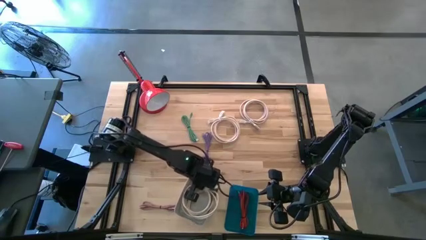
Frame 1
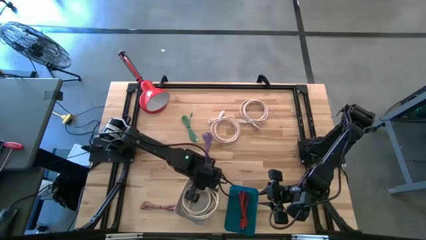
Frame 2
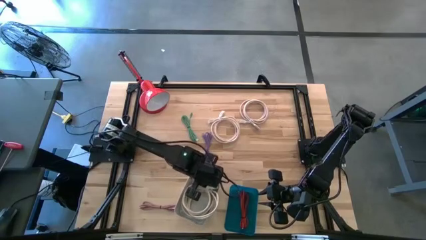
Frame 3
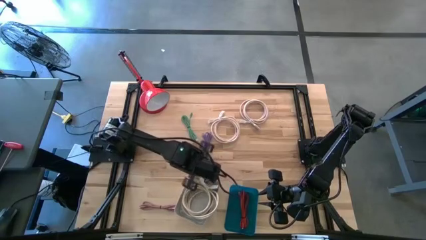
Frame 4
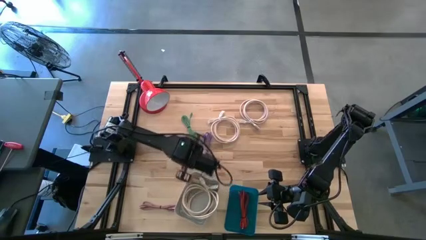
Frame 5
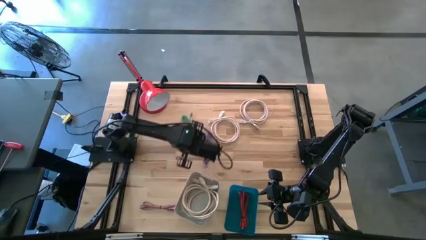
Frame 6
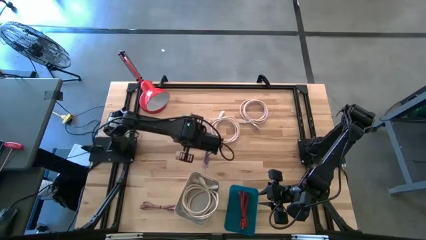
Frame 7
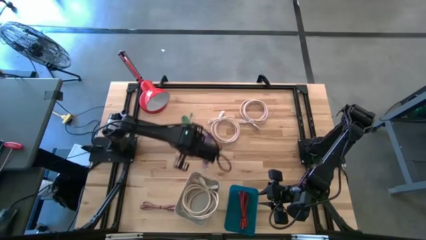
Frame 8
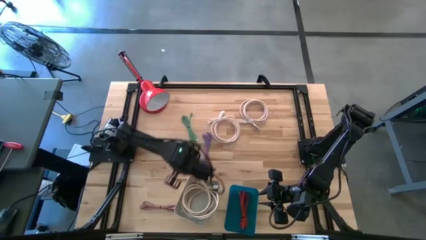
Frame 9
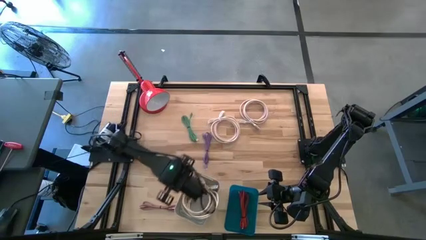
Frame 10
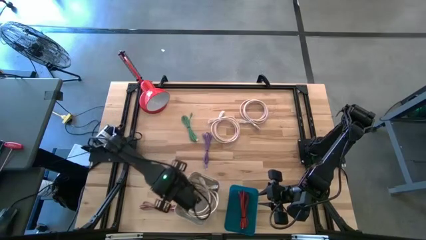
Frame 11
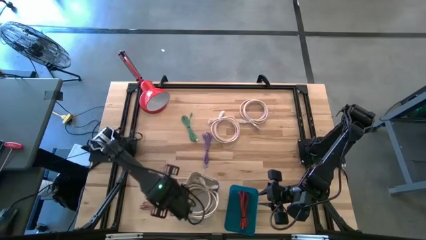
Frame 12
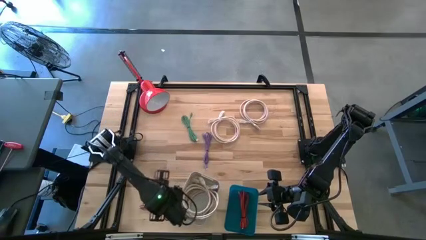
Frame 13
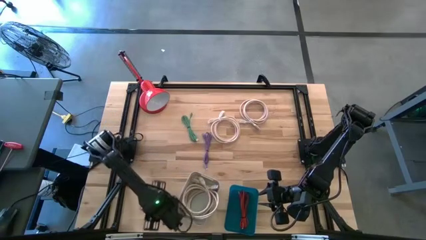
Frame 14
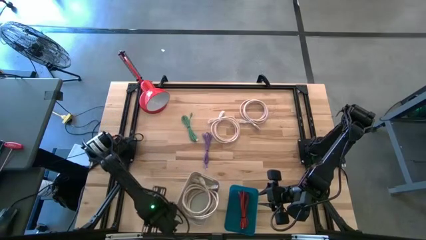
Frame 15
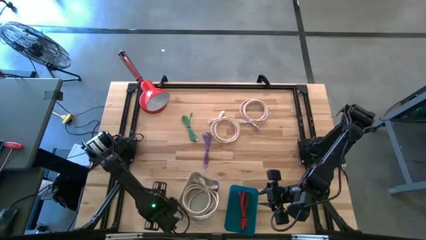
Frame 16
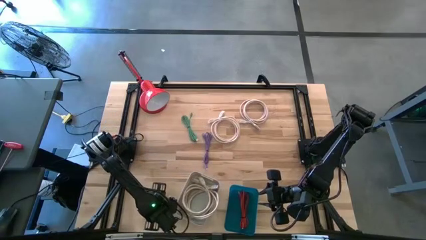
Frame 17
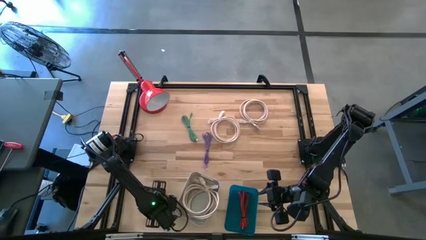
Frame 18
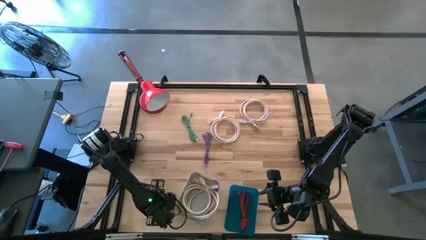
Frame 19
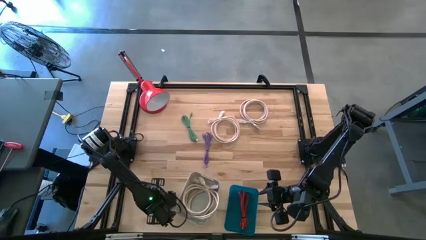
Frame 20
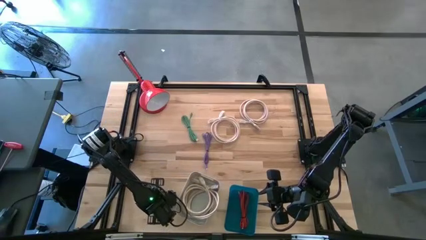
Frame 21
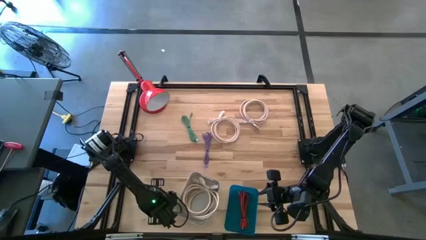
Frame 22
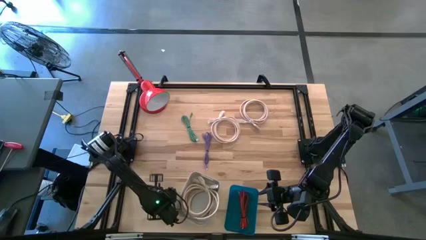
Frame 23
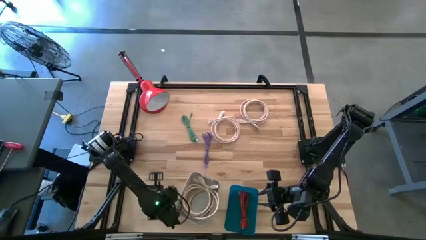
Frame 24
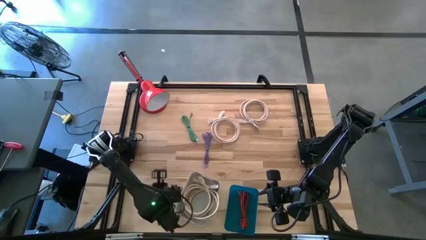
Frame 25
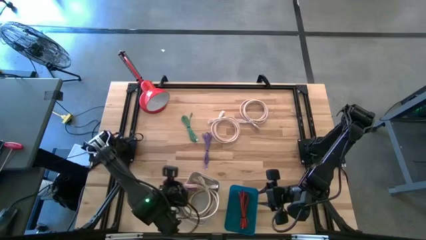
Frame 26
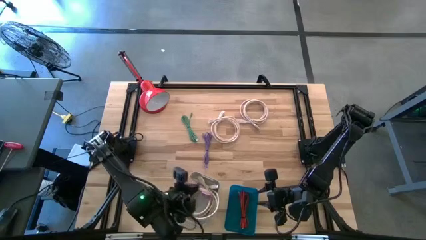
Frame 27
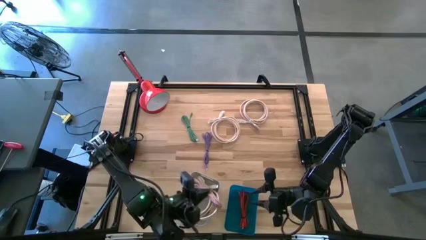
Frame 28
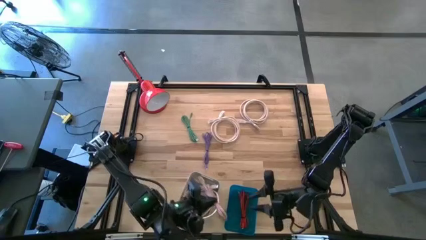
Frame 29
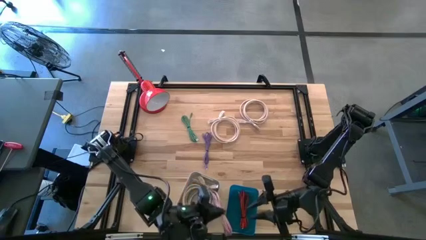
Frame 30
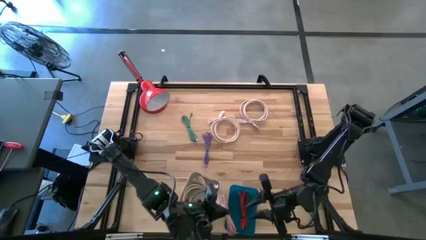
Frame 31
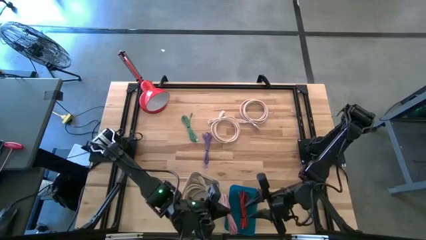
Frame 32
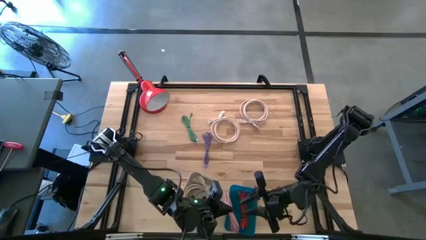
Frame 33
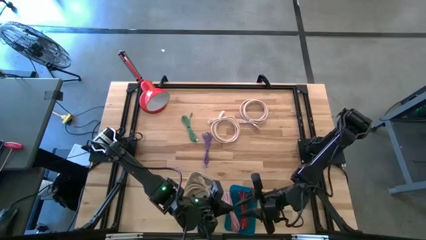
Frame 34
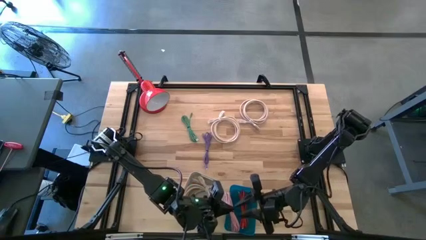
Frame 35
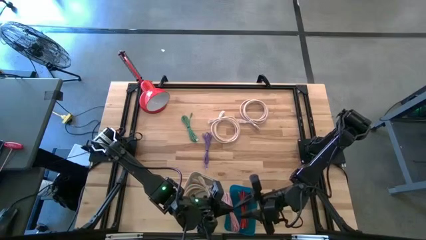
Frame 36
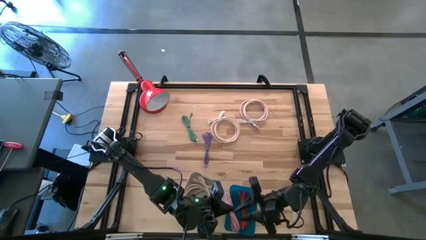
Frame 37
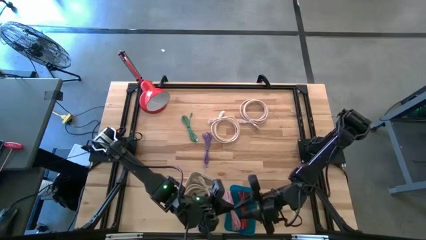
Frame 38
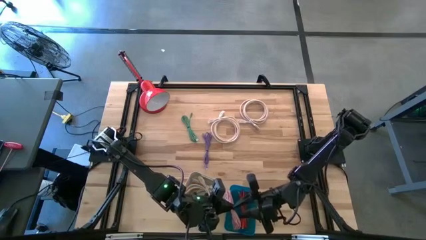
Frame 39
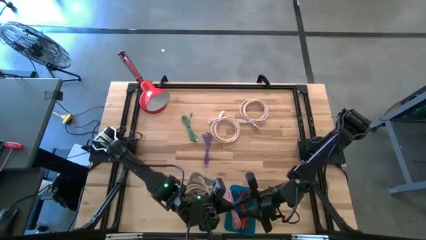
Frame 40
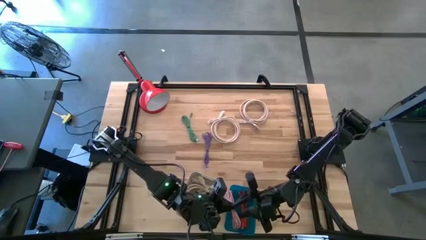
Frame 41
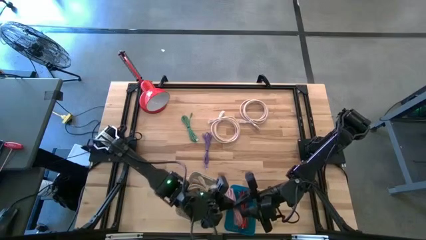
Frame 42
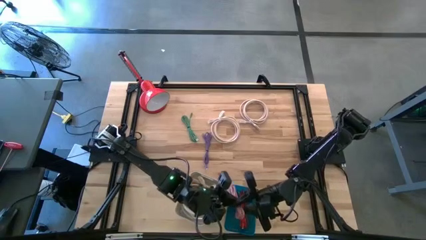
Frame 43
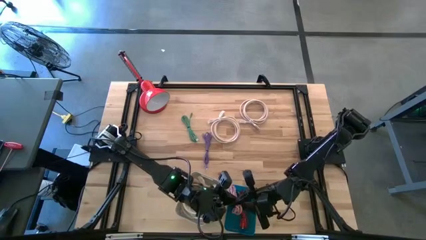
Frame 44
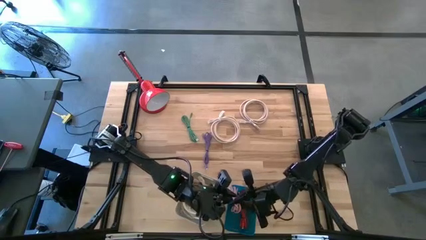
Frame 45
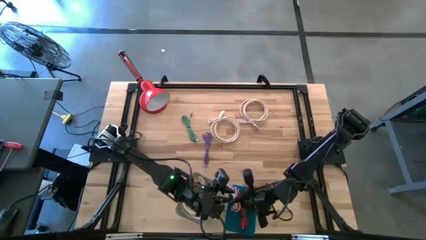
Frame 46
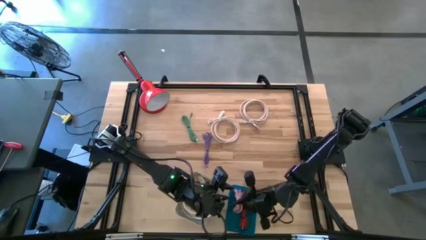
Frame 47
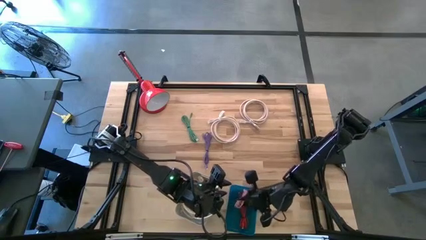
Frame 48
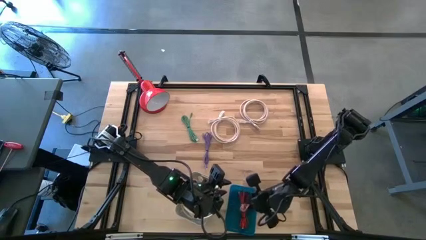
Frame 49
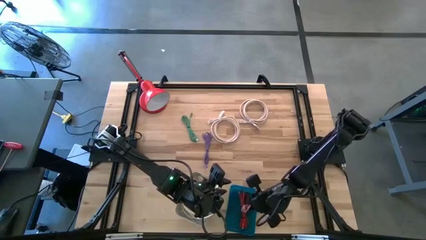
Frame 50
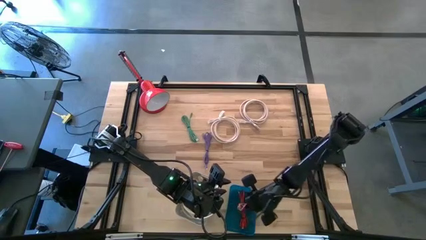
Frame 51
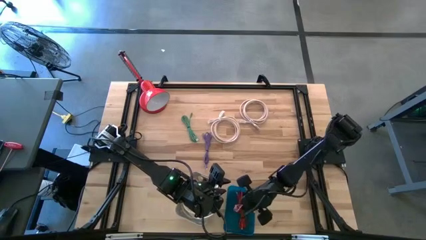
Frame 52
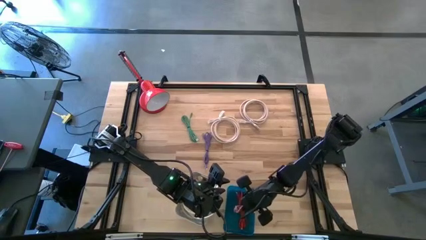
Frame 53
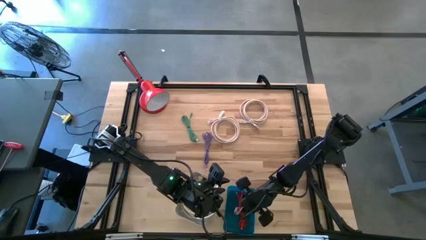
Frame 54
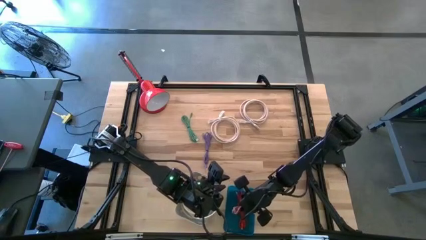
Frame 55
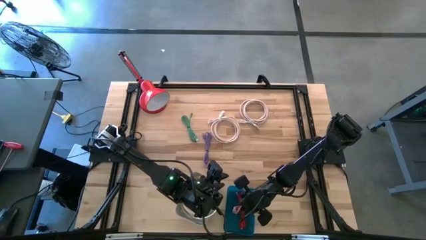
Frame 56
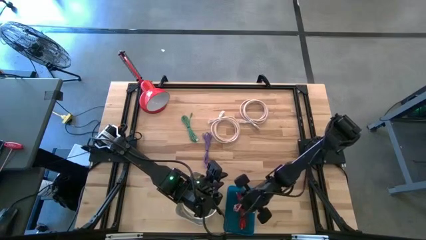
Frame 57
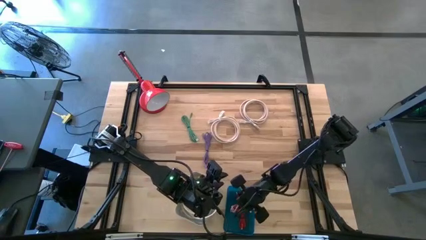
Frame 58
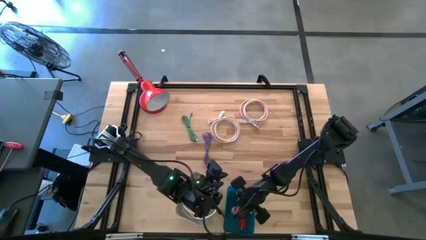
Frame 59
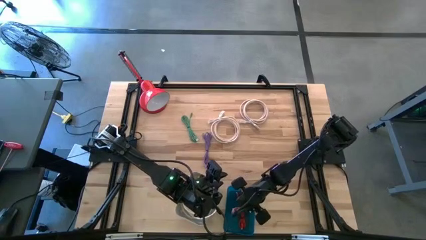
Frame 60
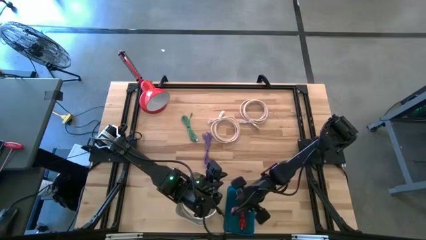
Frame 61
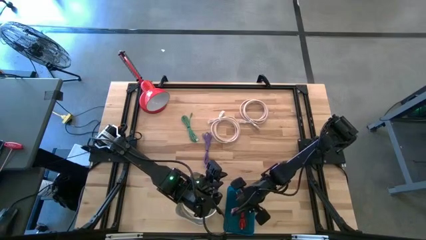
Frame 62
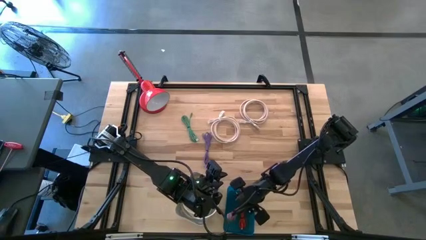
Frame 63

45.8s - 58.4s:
Task: Pick & Place USB Port
Put the pink USB cable into the blue bin

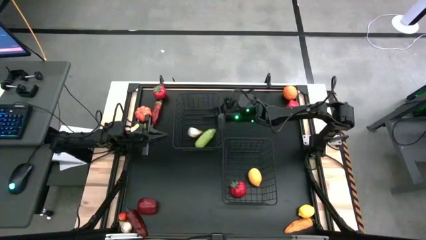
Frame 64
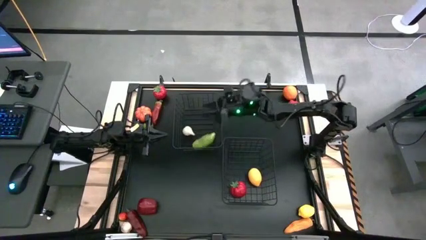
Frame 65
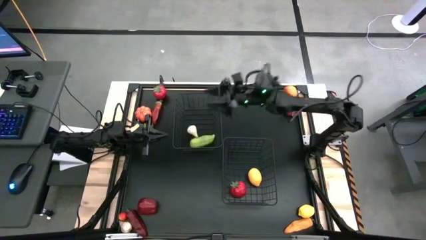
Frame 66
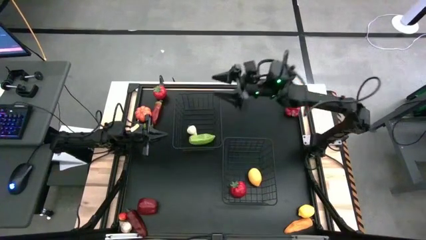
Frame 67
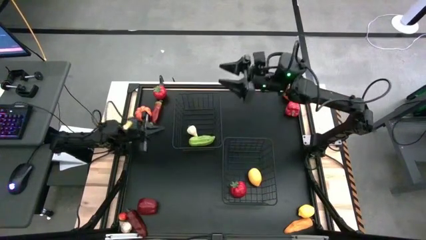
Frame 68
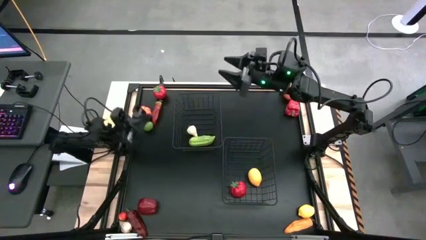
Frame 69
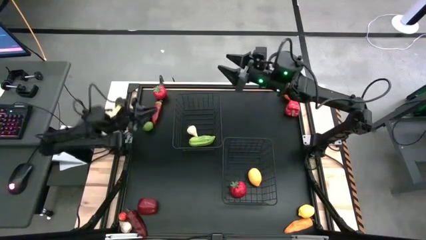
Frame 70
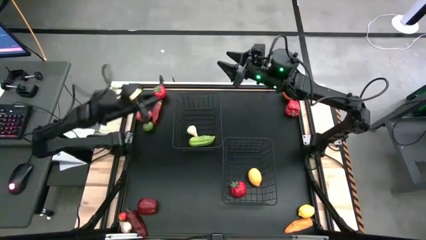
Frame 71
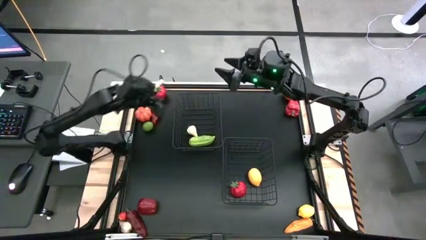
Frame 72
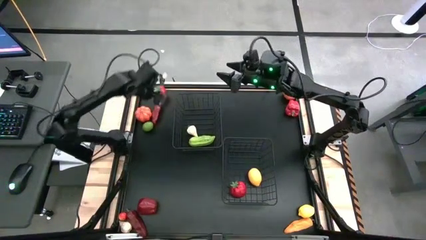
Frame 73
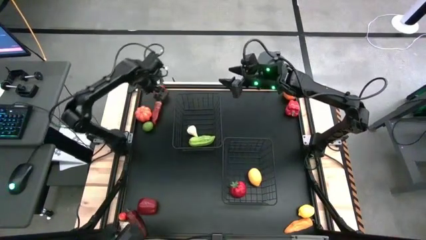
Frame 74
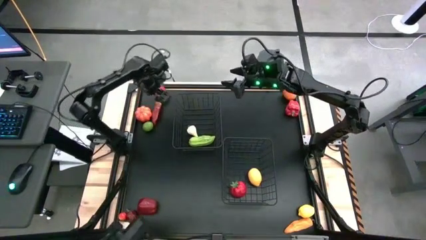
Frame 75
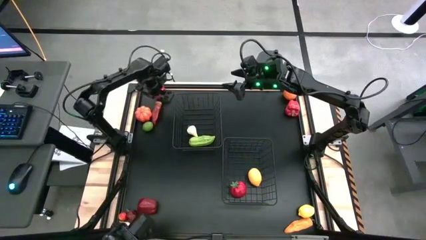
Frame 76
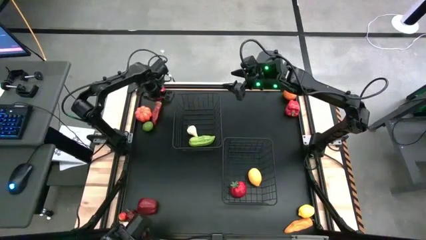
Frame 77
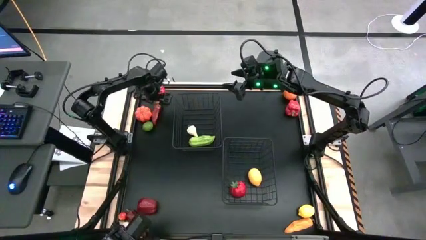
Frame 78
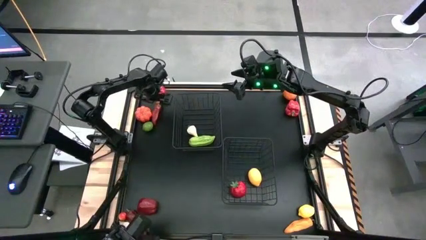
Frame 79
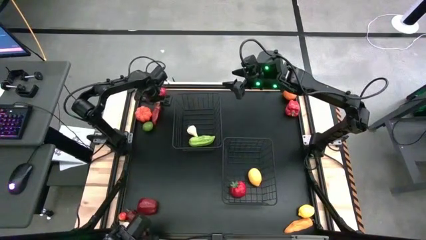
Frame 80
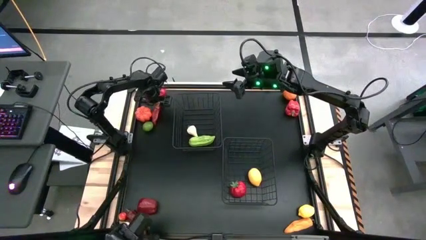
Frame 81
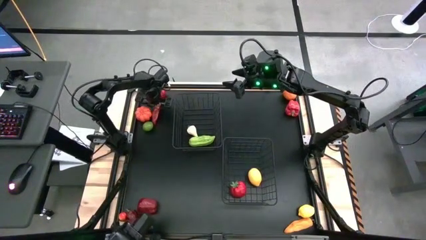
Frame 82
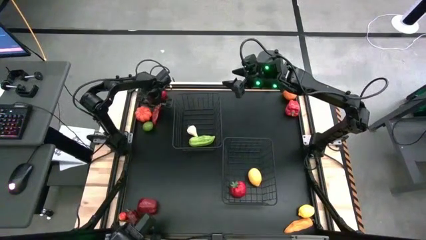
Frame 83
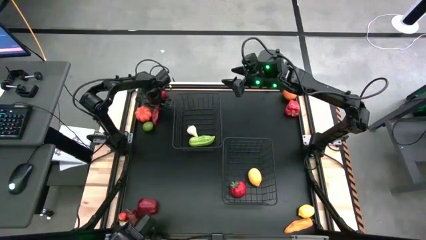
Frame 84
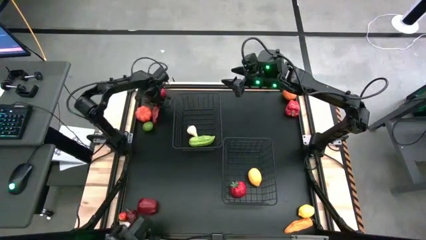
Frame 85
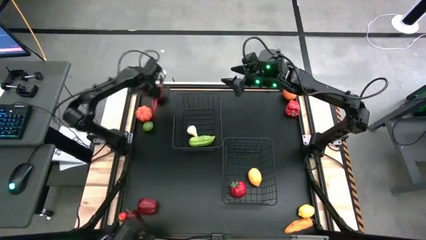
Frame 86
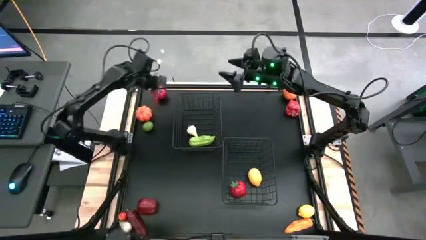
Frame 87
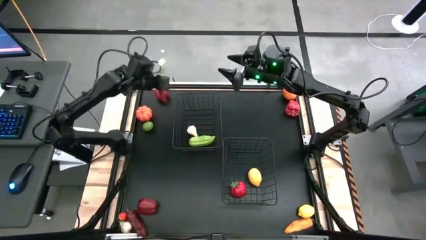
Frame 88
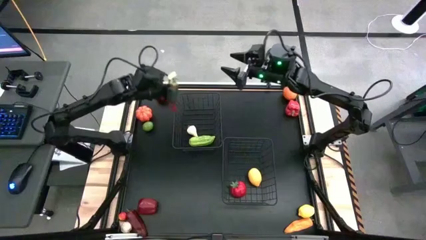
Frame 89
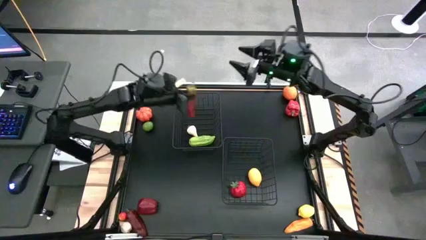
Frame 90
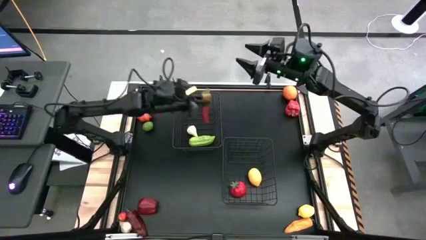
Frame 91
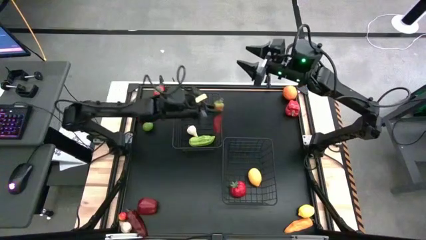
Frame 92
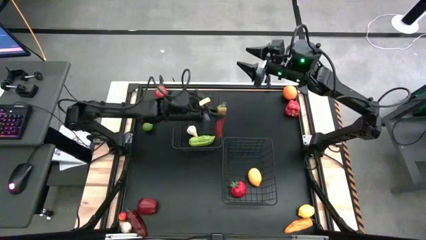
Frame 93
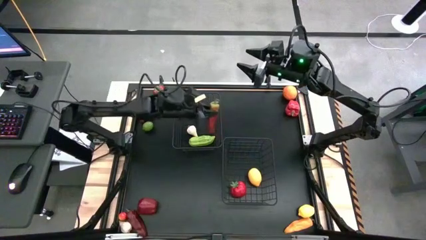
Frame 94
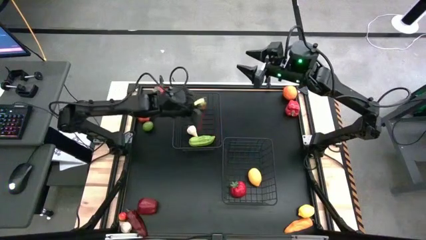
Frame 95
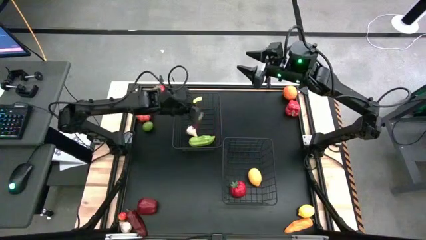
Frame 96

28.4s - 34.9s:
Task: Sort produce into baskets
Put the top red chili pepper into the top black wire basket
